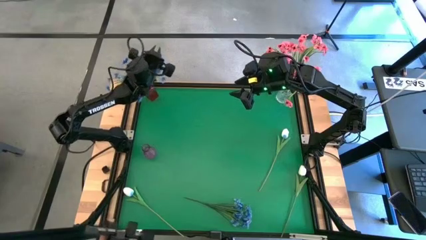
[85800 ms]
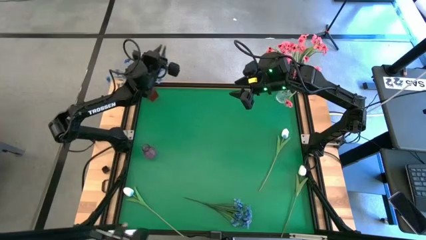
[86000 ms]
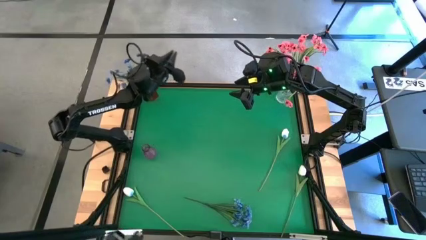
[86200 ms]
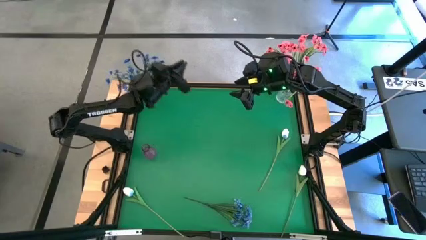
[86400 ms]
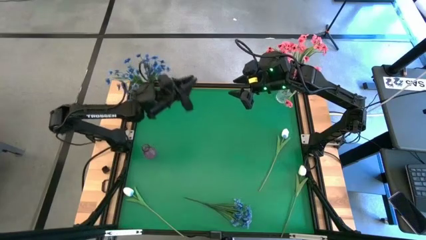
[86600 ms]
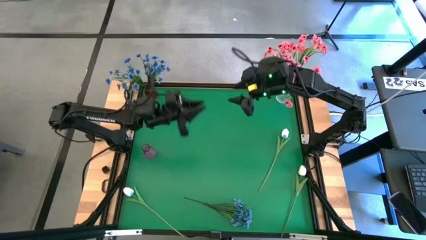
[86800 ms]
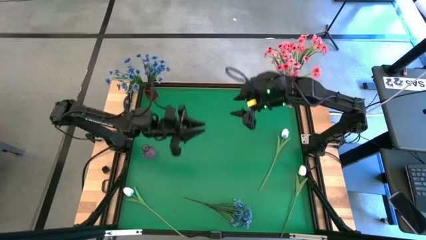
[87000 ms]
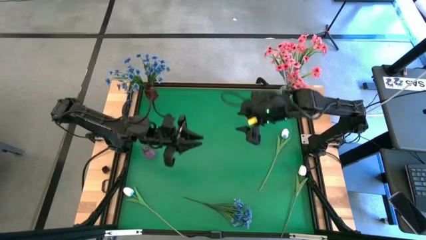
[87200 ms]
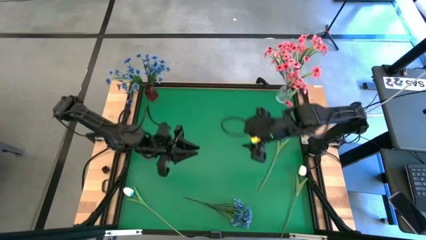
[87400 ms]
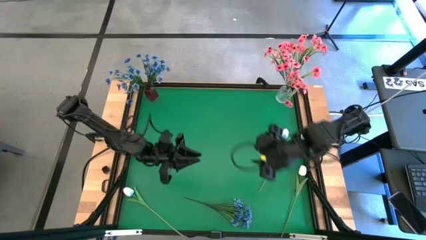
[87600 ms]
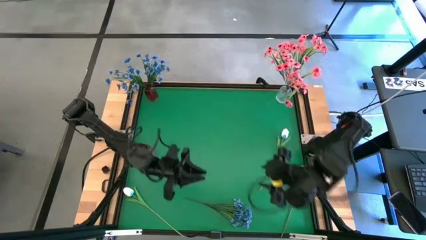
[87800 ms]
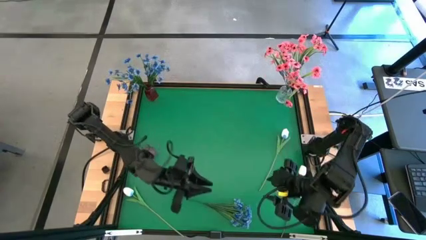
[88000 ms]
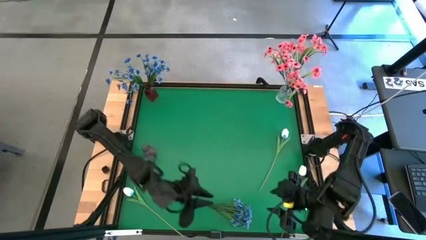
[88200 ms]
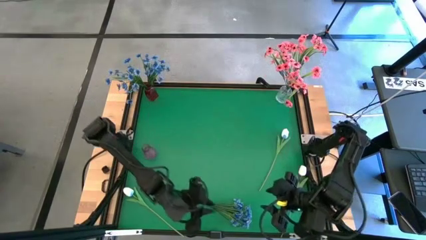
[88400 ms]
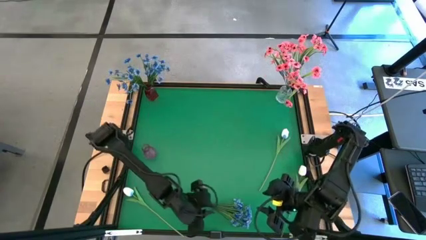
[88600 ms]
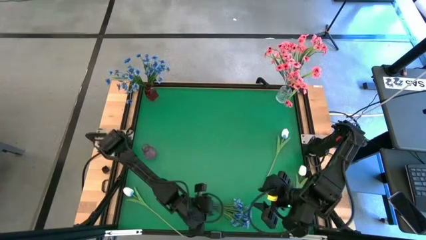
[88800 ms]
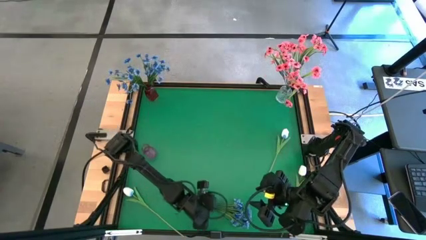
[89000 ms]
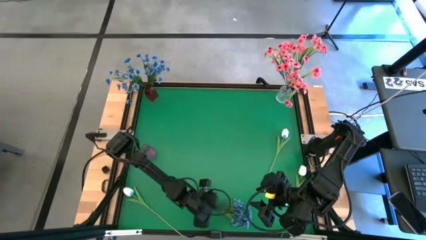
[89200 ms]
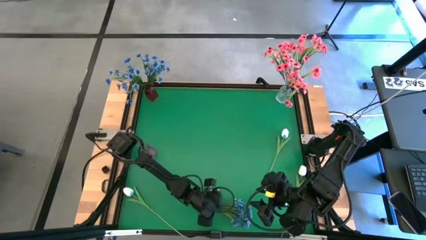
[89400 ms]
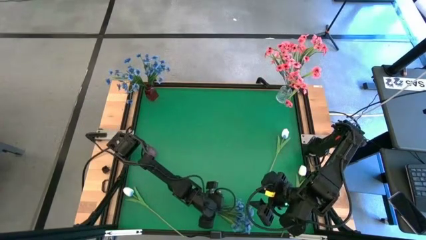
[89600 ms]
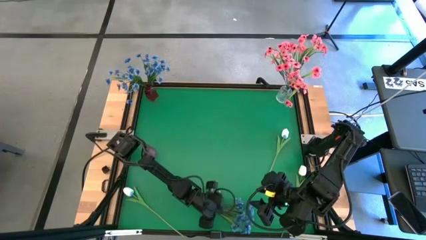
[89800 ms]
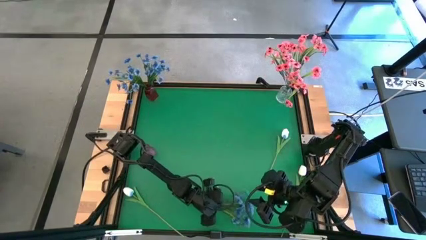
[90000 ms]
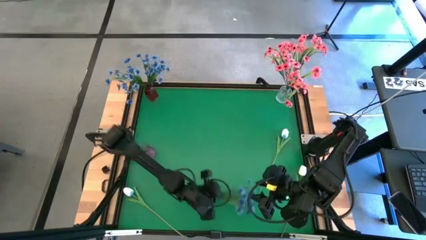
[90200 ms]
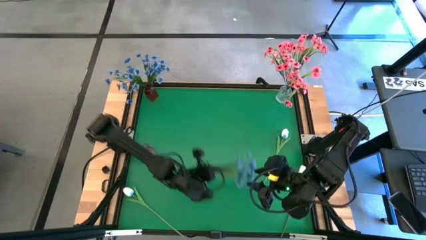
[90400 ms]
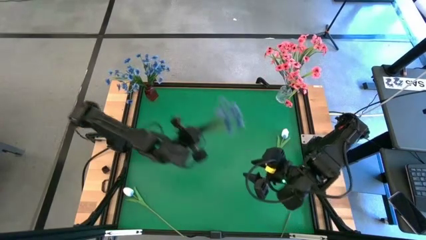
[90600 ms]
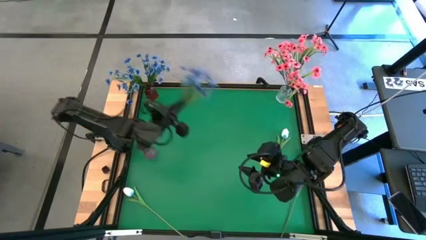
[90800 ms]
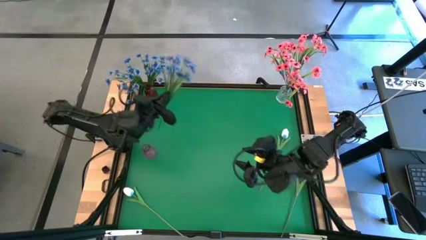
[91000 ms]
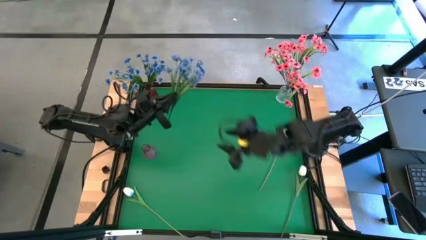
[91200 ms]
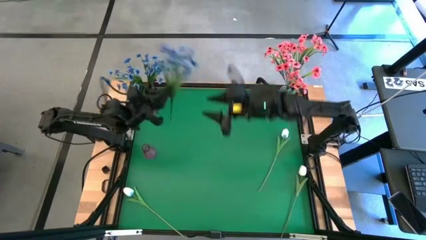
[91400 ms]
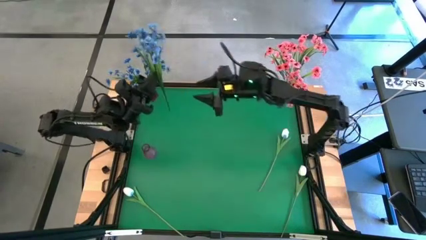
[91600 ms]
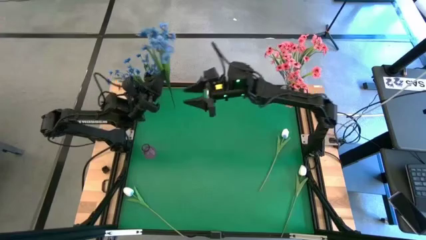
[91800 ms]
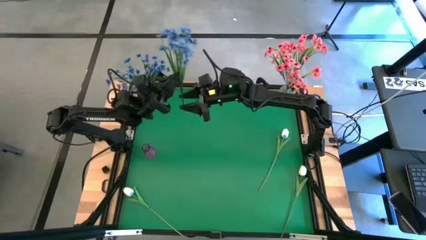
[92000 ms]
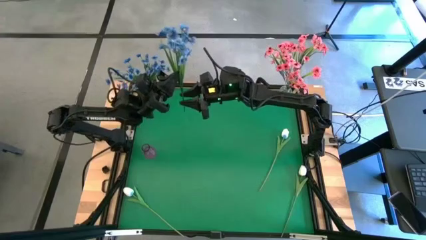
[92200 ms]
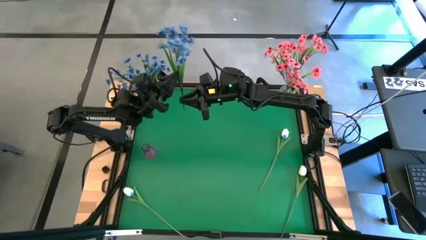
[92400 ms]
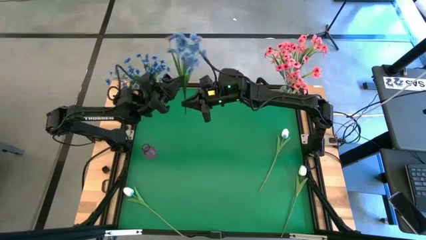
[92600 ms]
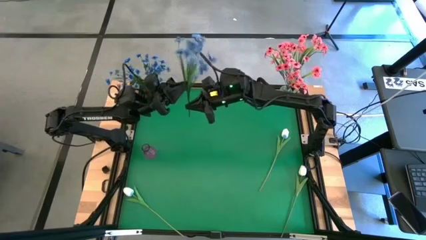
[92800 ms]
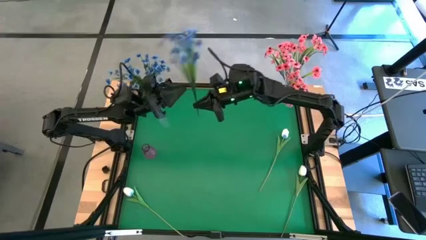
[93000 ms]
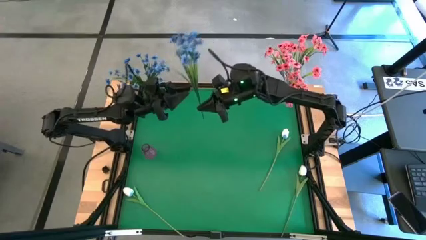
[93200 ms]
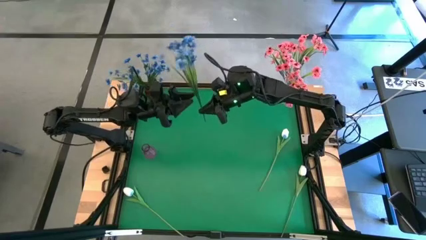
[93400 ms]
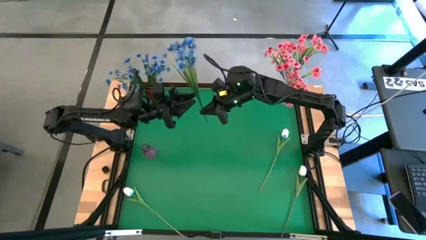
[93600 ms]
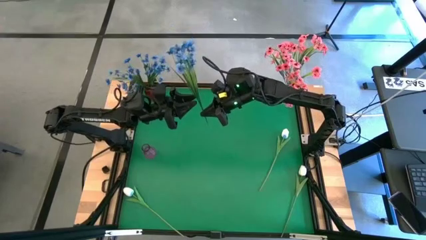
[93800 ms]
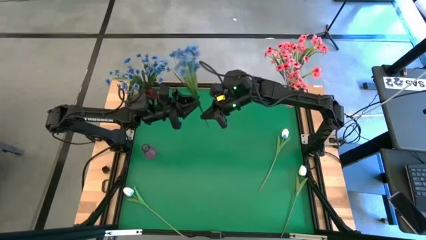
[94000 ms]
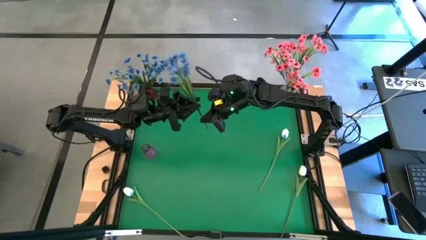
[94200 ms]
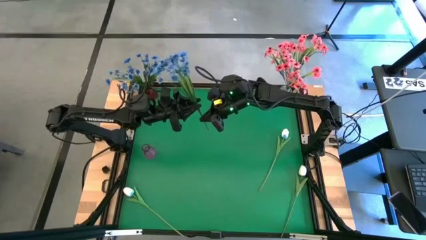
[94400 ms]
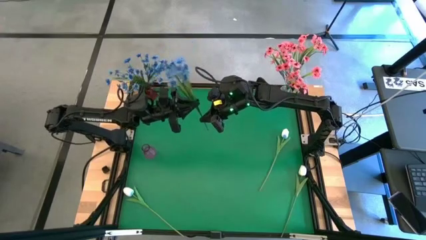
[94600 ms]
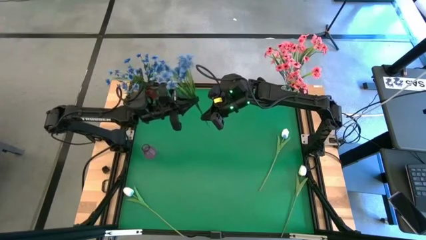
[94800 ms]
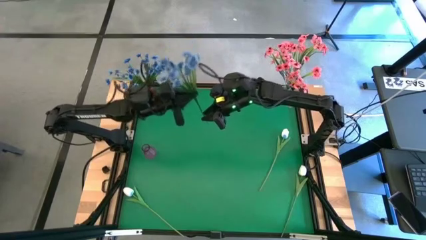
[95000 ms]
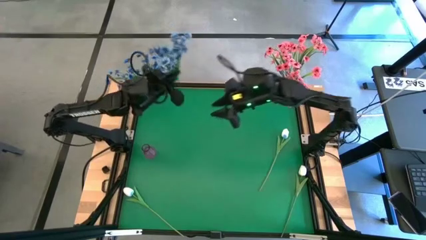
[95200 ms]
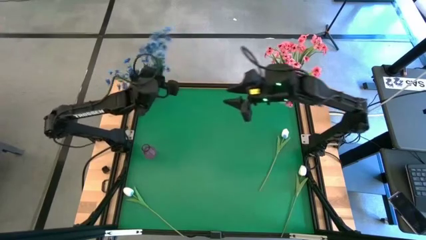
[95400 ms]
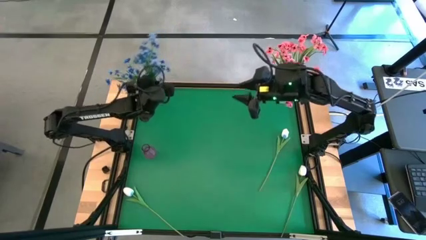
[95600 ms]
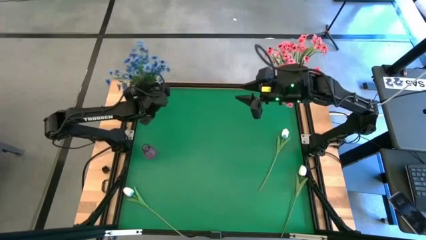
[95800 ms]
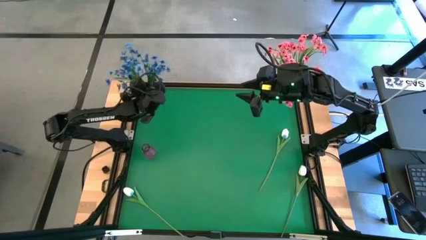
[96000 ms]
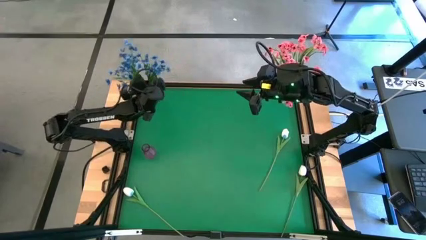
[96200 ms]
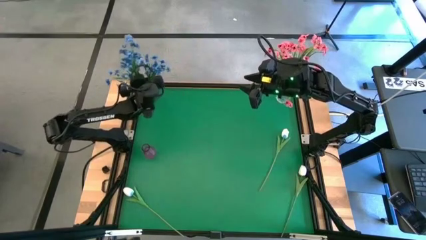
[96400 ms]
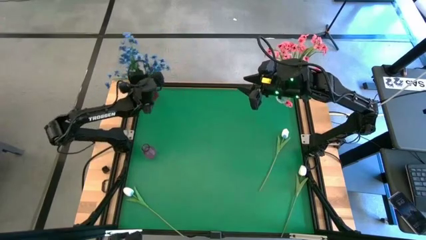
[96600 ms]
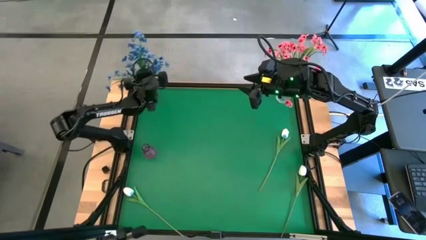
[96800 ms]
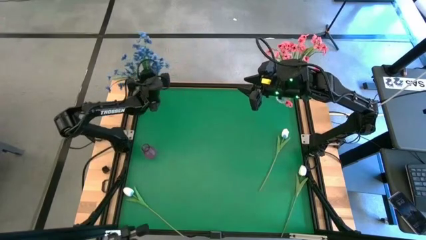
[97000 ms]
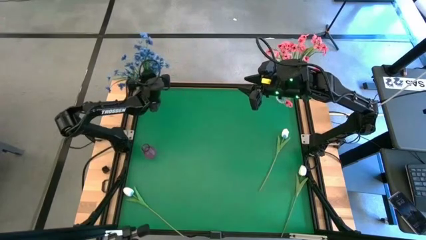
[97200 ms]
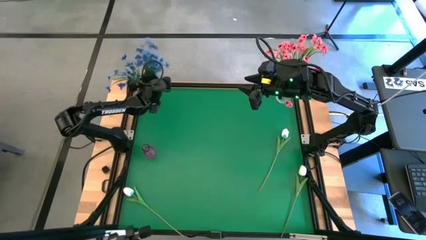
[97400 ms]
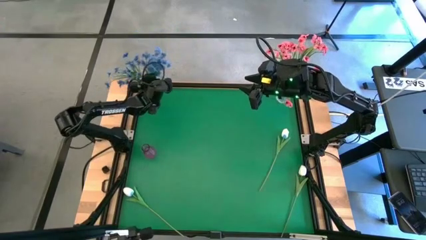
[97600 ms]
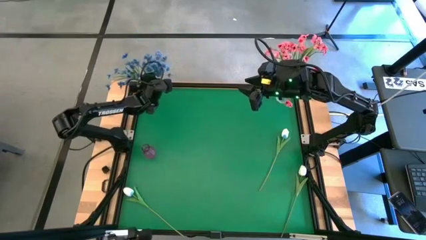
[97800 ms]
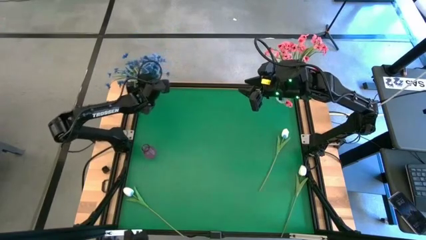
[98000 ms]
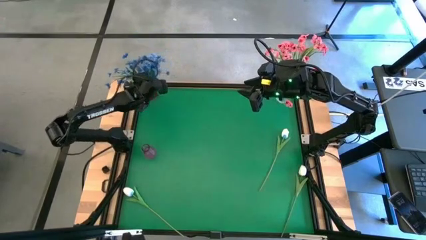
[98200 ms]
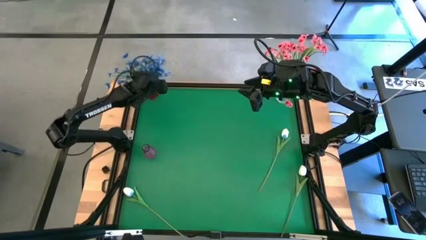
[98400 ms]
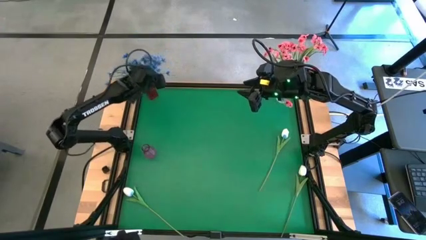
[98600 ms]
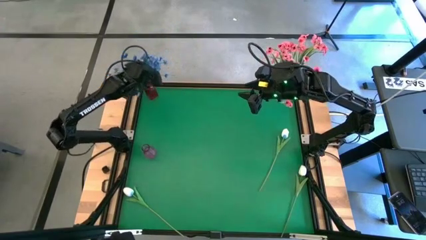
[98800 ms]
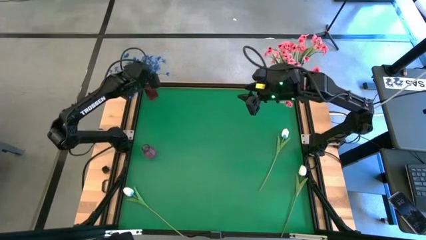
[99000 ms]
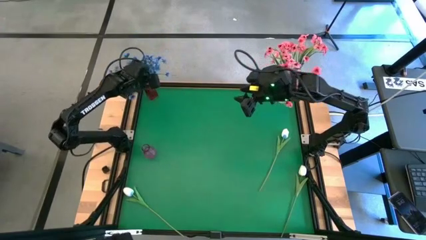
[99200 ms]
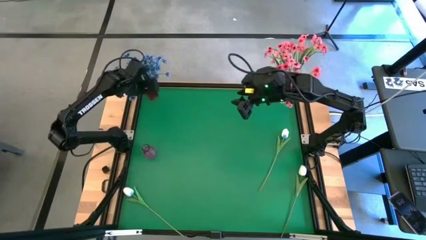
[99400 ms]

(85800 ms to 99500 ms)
Task: Sort flowers into vase by color
Put the blue flowers into the red vase

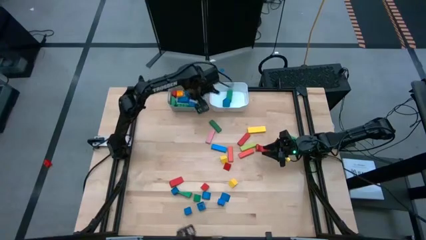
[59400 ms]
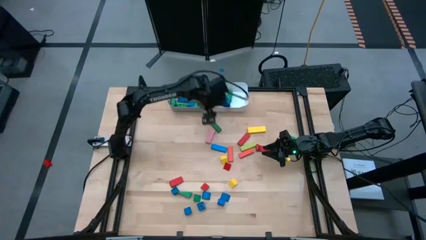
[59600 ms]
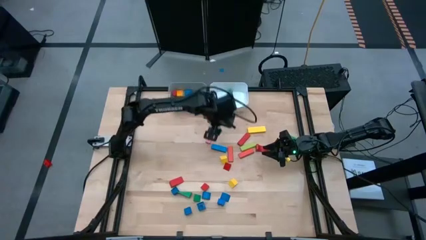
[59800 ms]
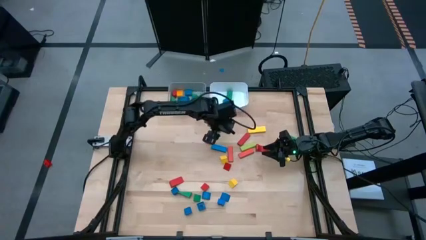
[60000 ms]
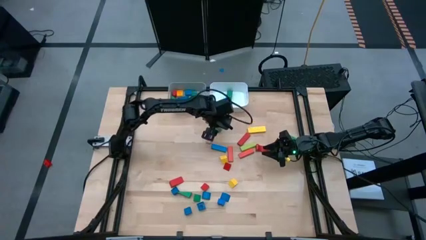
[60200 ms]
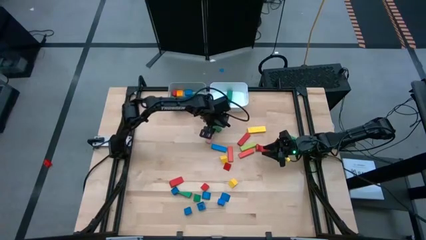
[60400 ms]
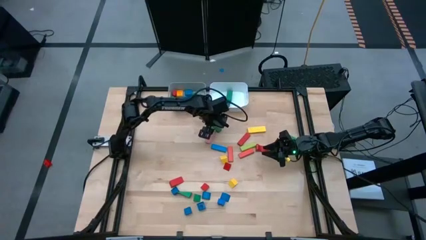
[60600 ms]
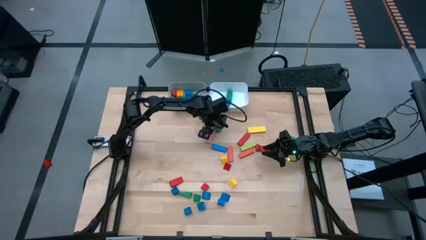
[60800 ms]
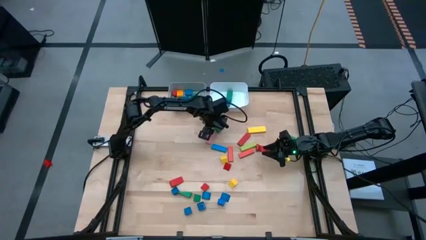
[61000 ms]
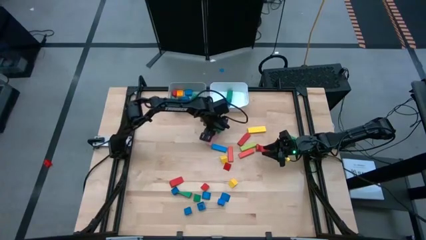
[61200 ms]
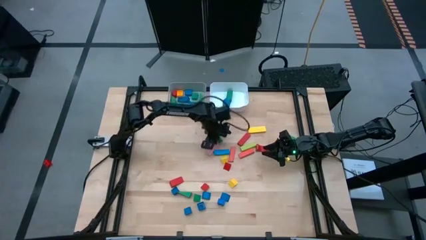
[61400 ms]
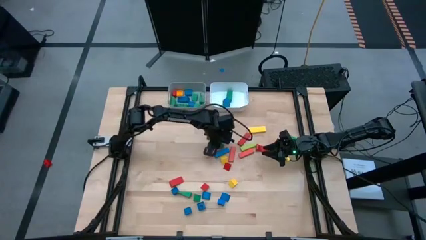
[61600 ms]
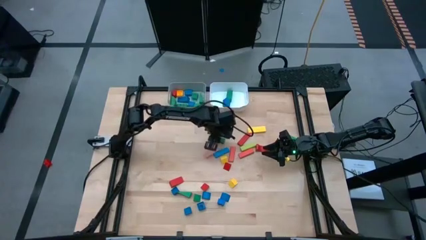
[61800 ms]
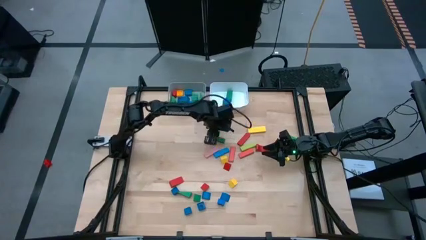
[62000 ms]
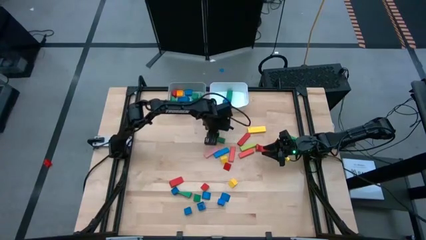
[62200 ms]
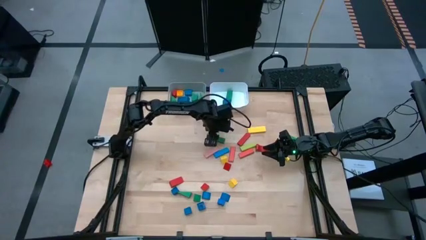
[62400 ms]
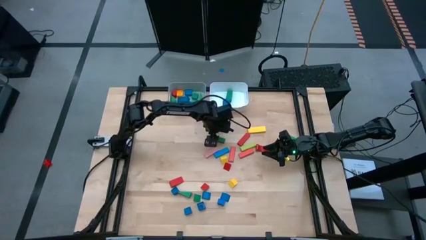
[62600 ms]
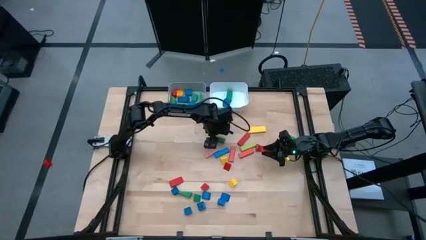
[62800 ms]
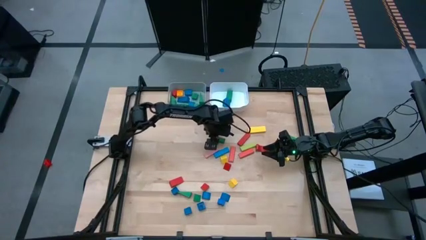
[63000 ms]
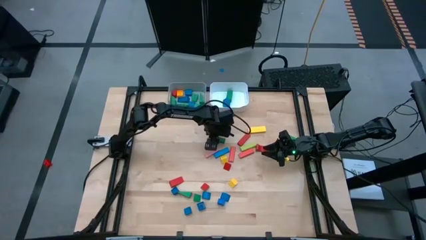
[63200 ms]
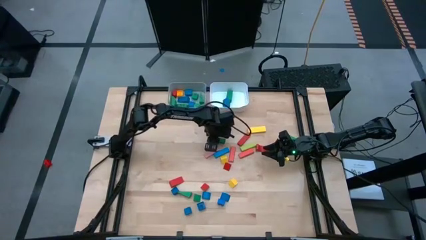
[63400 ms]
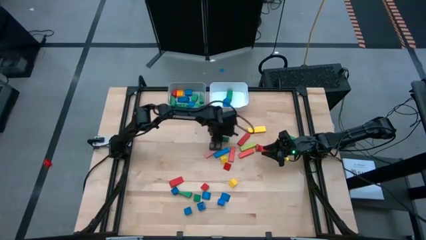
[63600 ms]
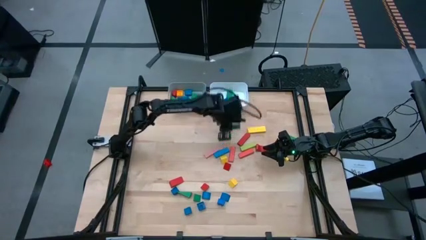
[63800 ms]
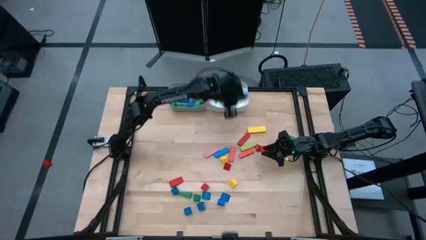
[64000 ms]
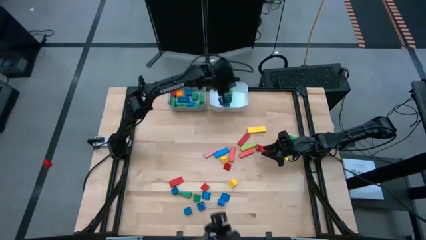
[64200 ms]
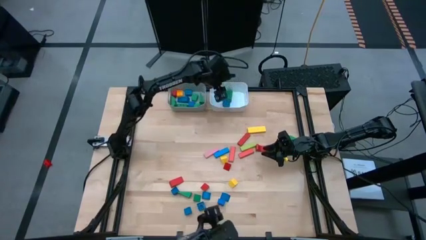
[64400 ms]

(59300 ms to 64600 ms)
Task: Sort blocks by size
Put the green rectangular block into the white bin
